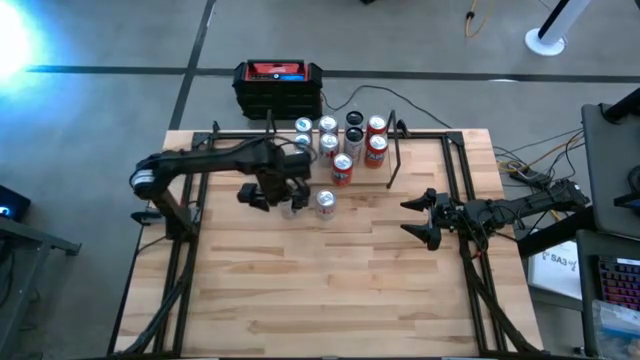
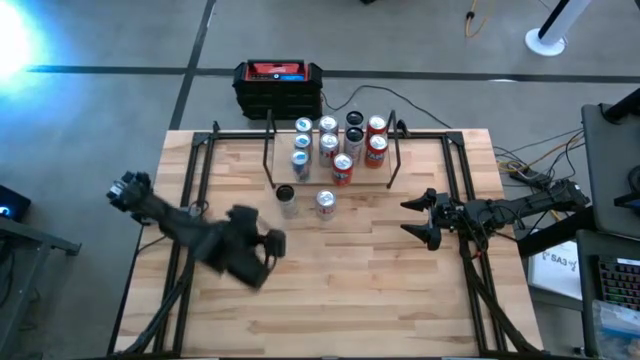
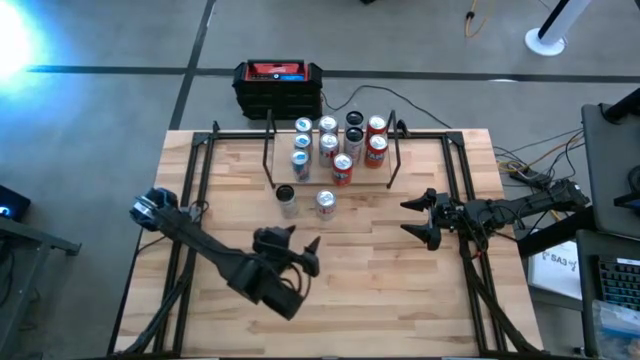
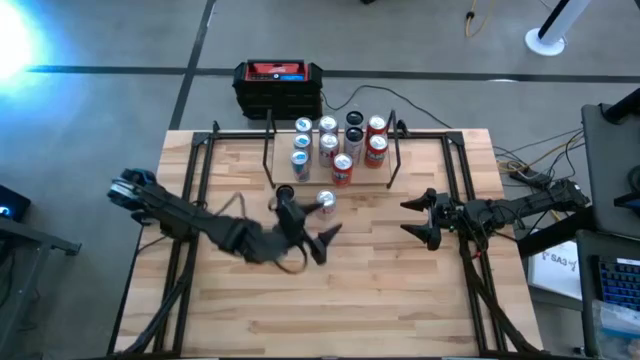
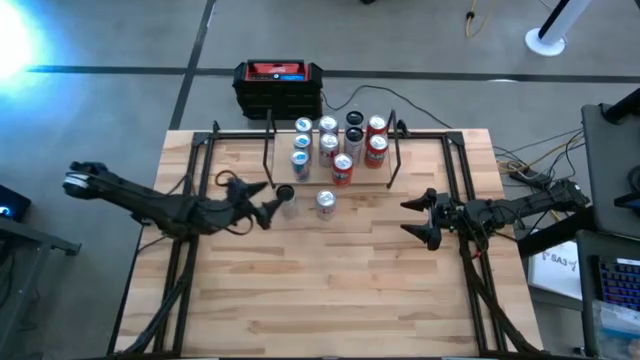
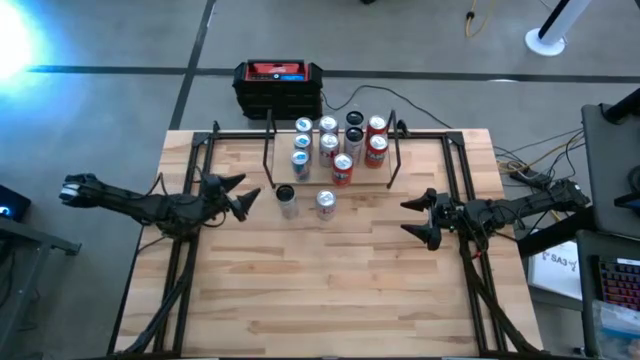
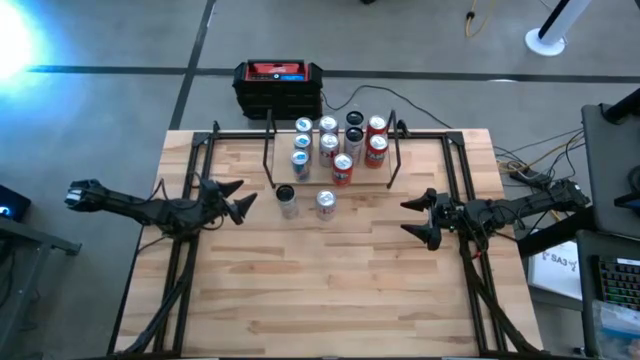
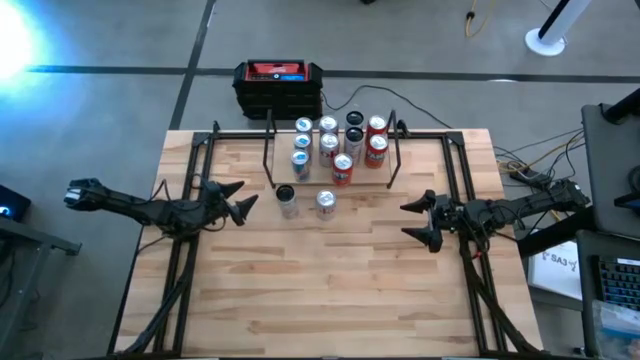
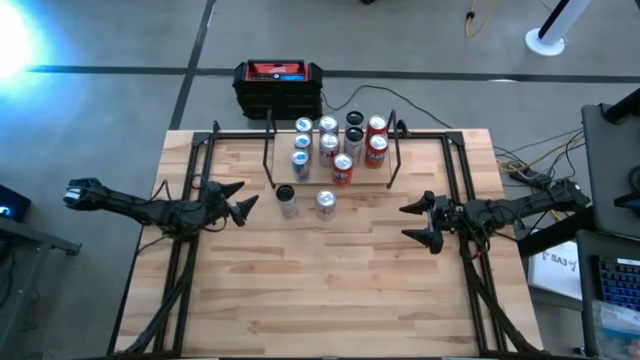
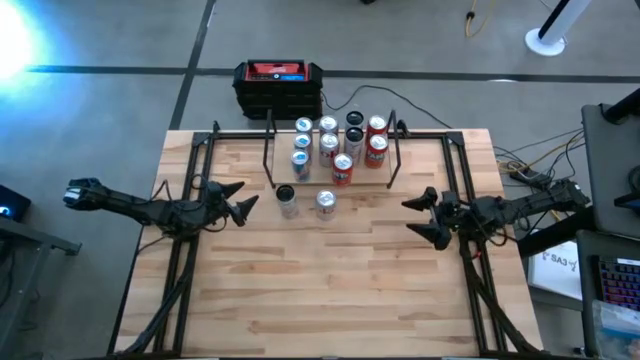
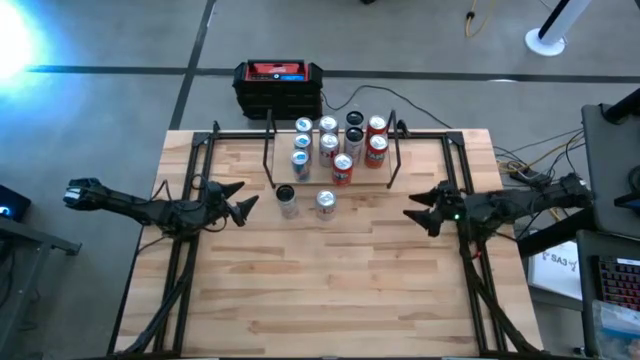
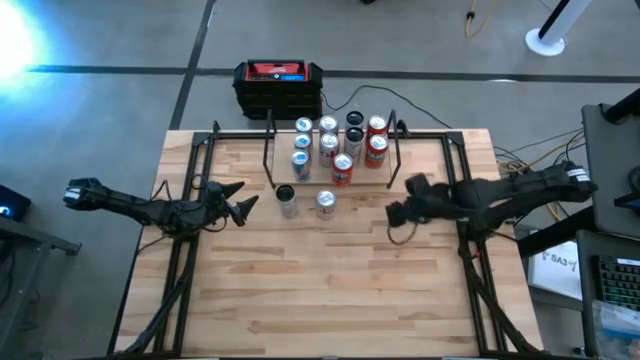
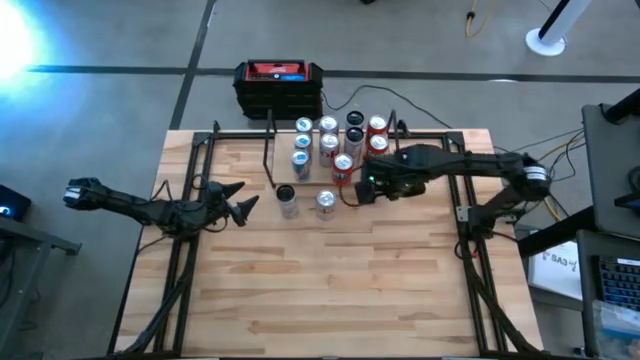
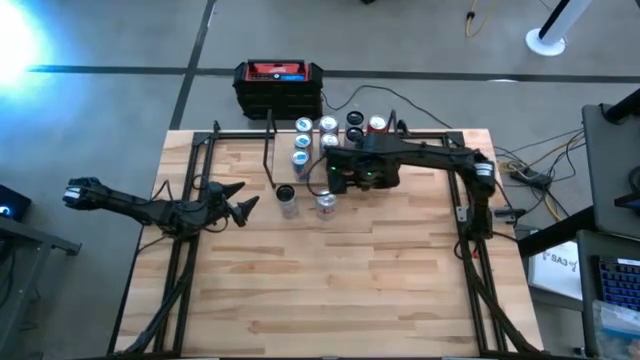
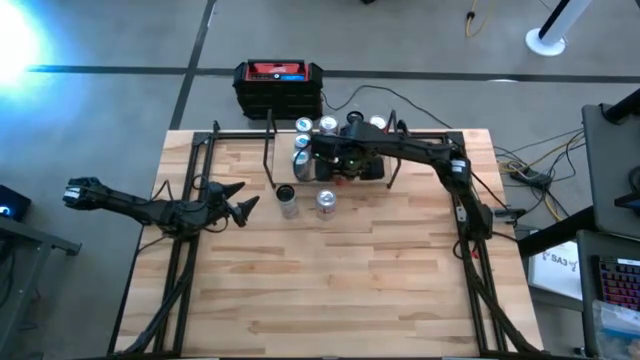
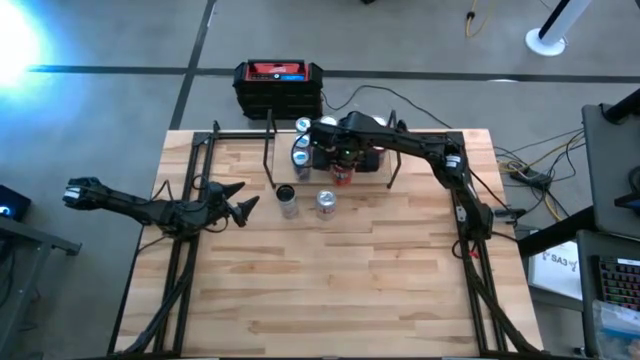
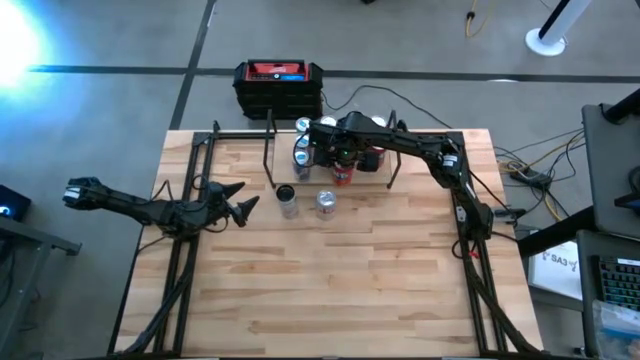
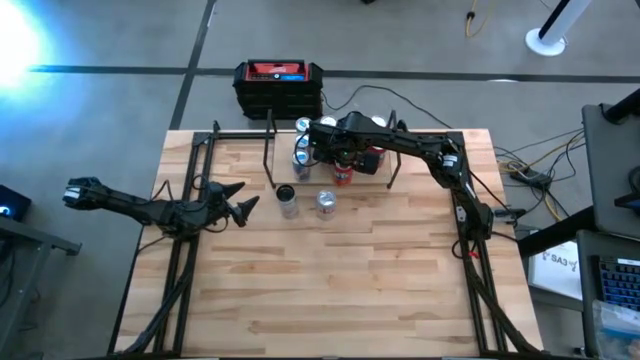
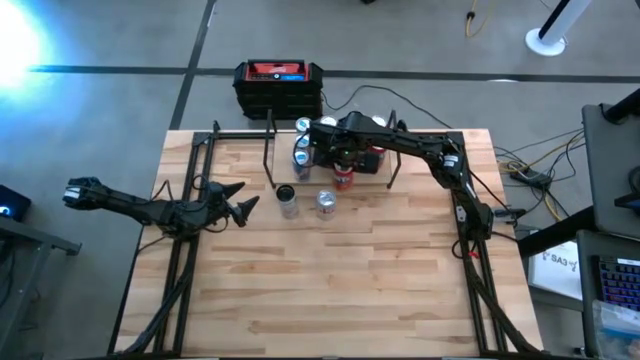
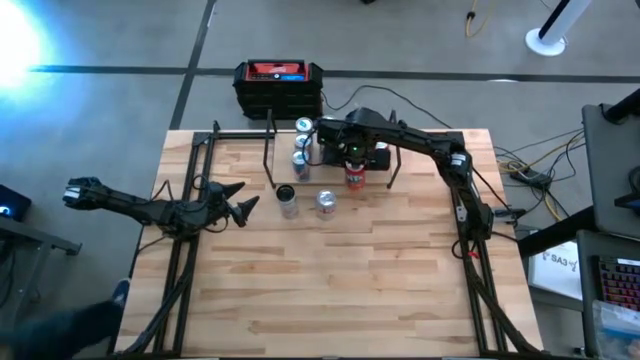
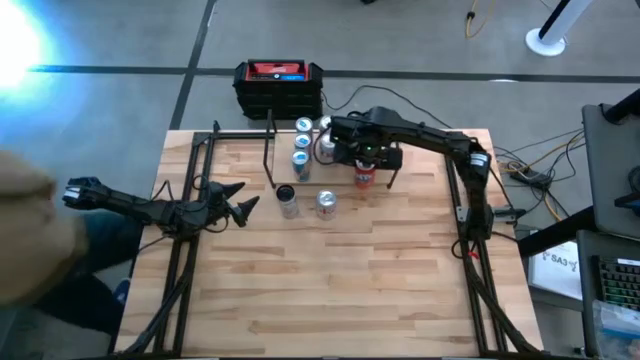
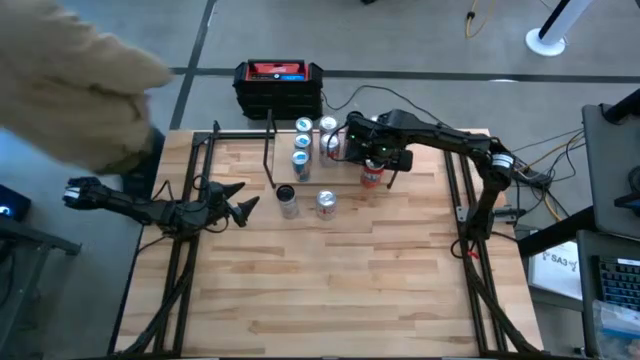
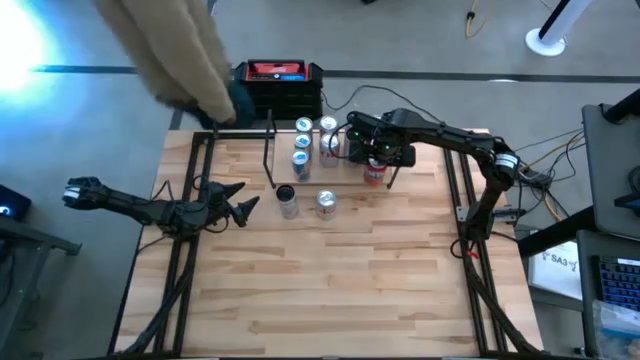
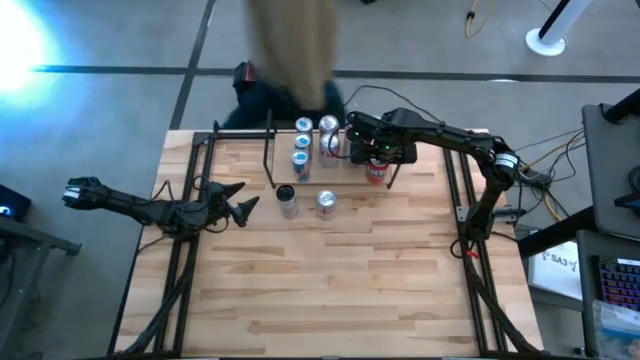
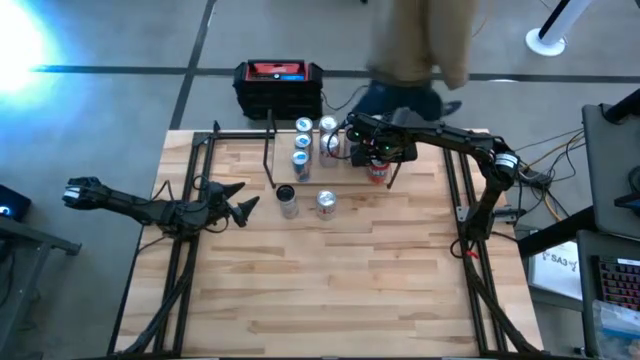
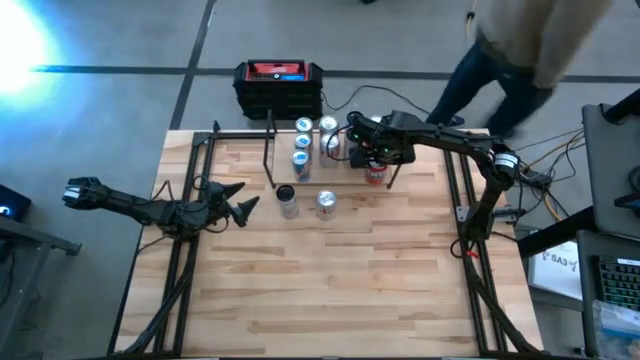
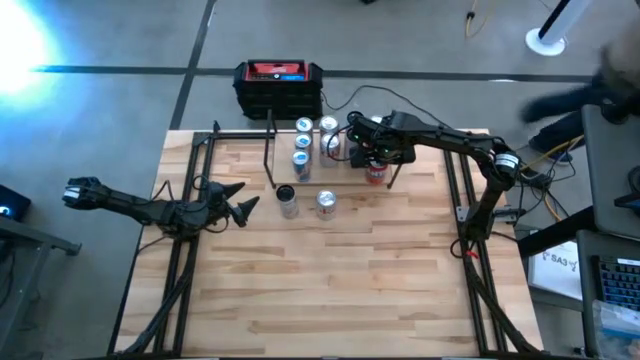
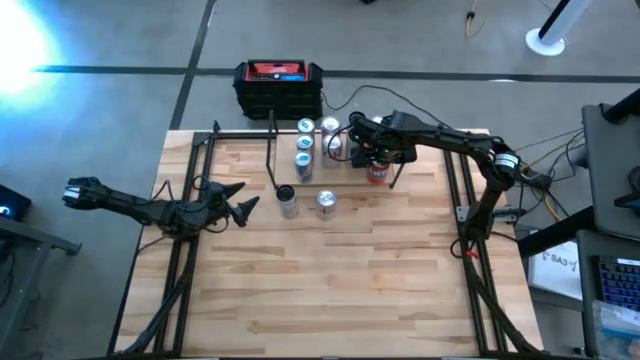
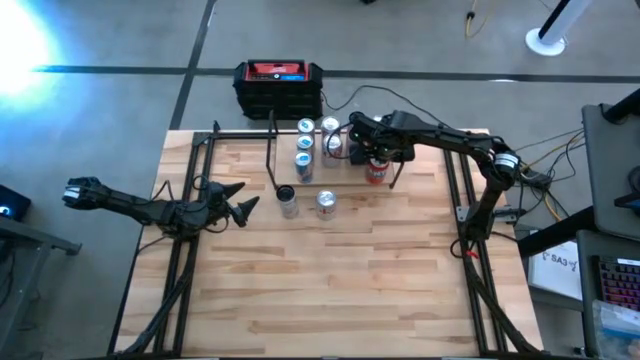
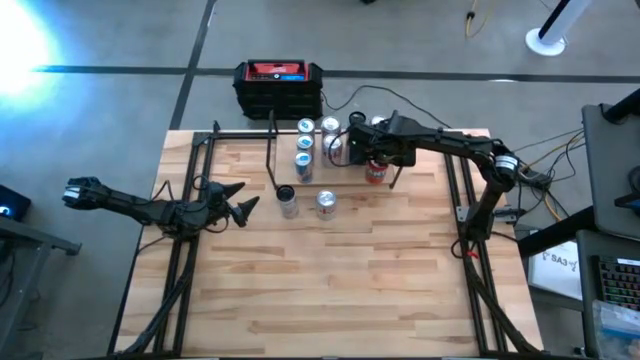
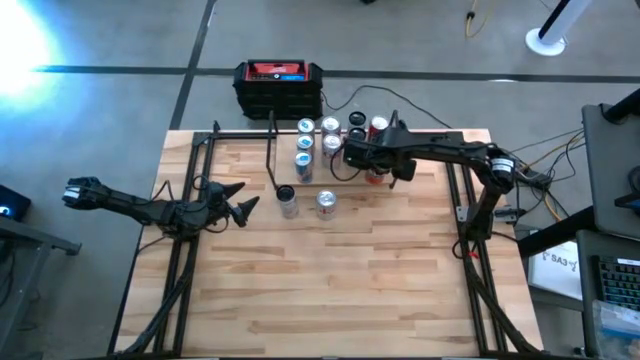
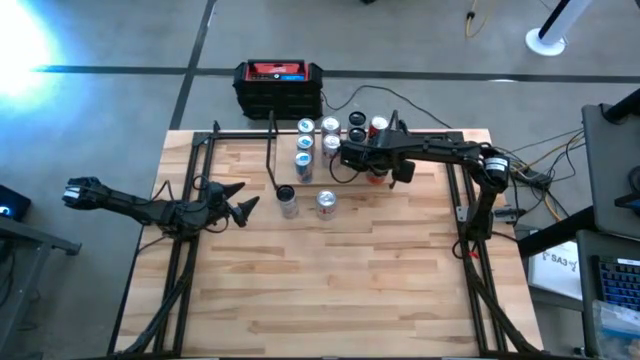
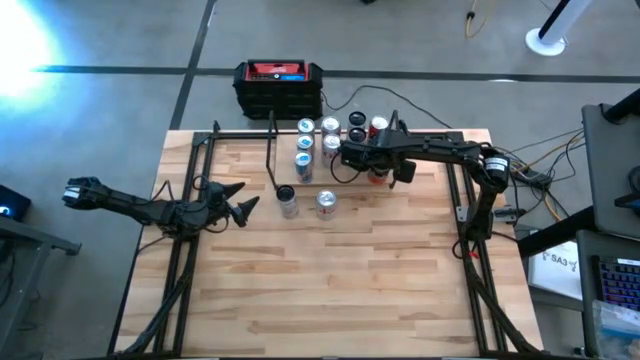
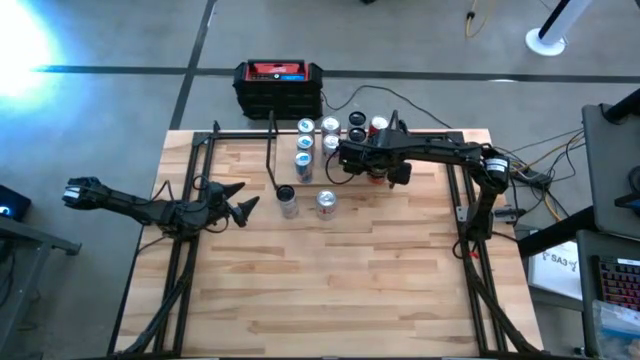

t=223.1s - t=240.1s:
Task: Place canned beverage on shelf
Adjust the red soda can

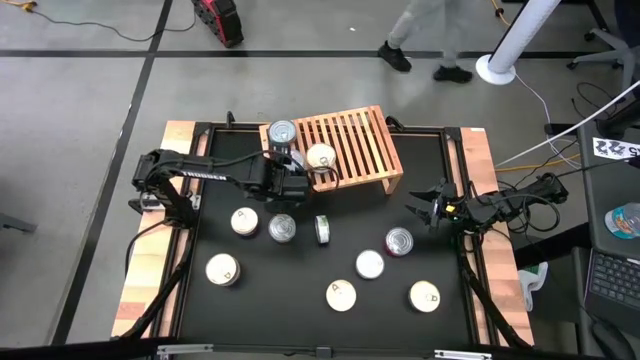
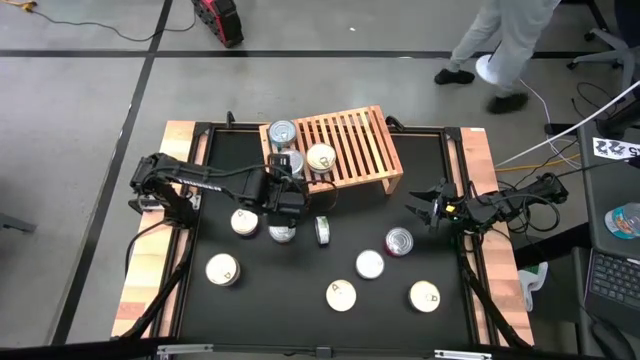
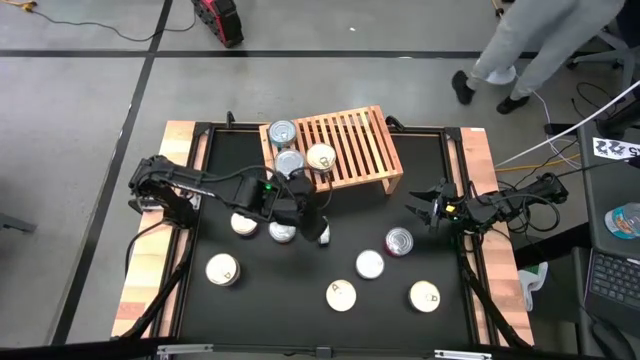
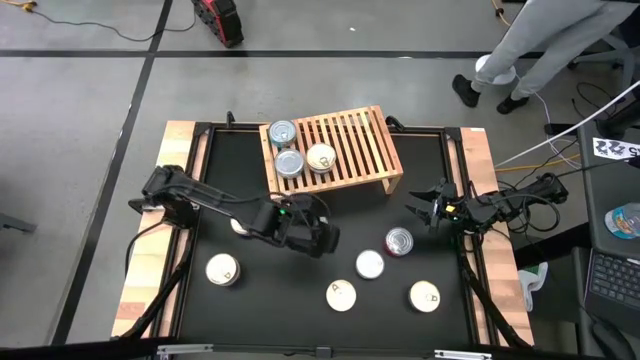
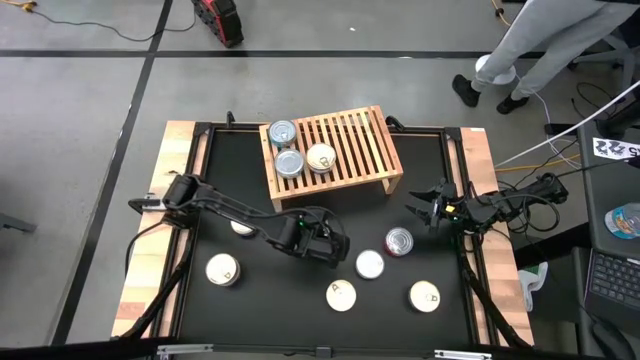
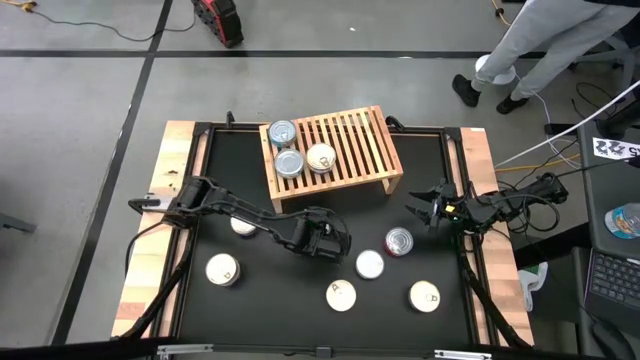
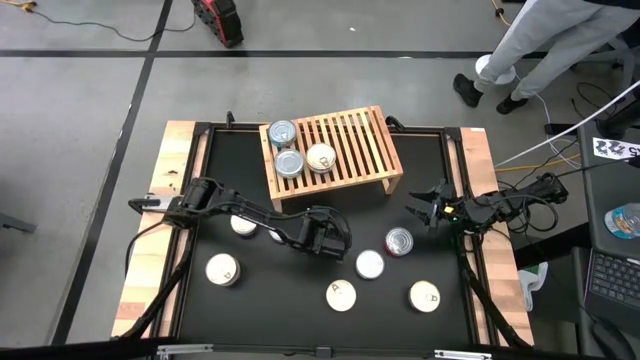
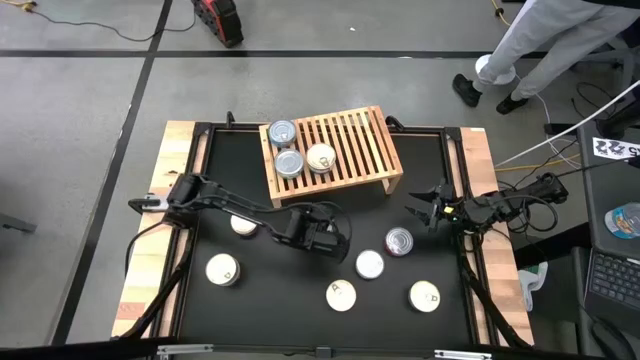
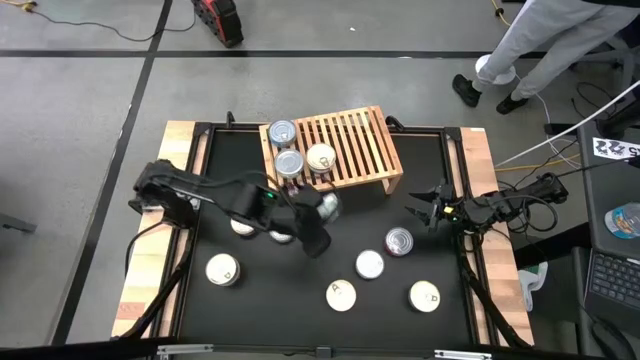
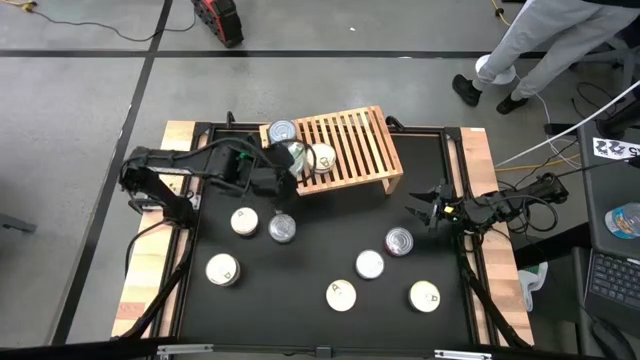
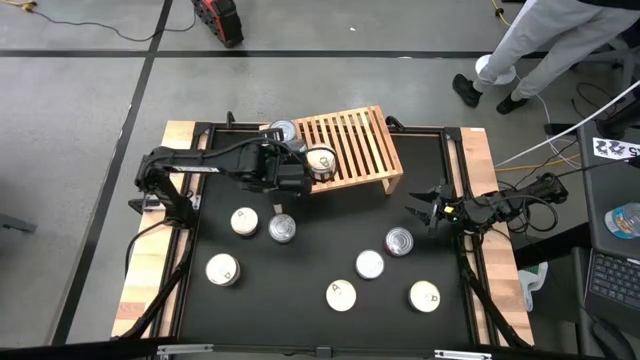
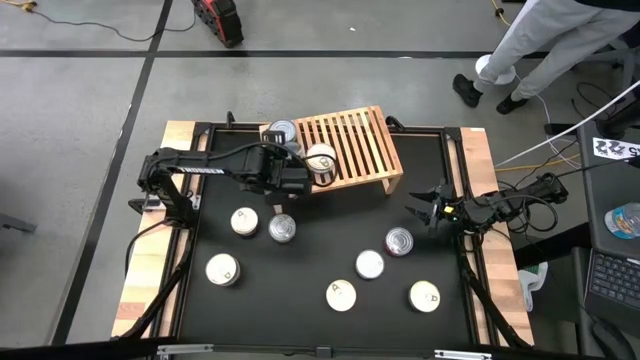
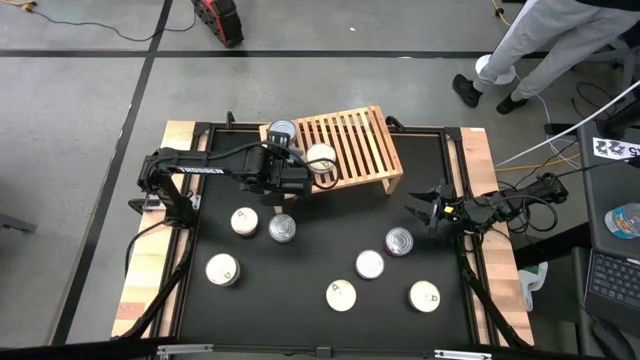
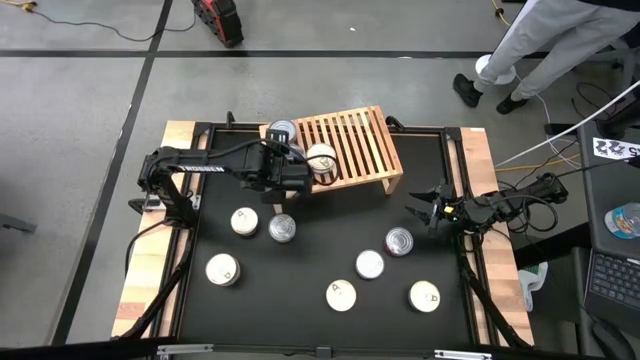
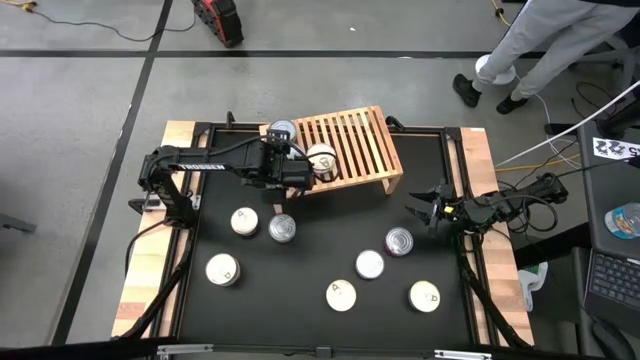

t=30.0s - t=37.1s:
Task: Stack canned seafood by type on shelf
Put the green and white tuna can on the shelf
